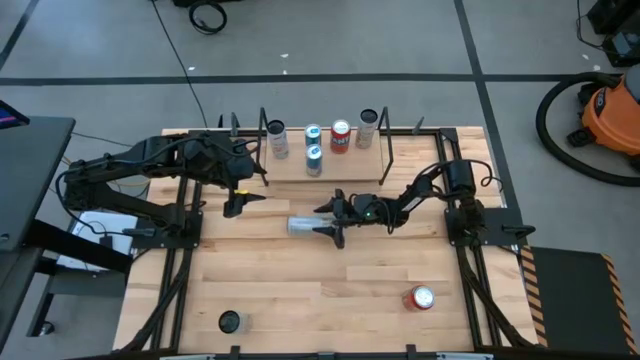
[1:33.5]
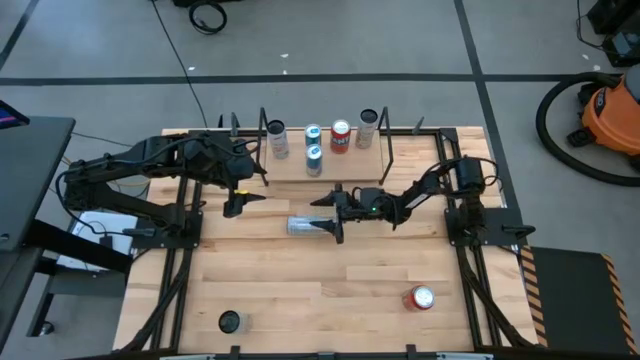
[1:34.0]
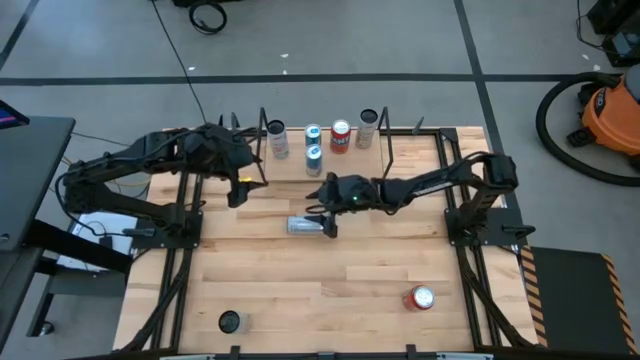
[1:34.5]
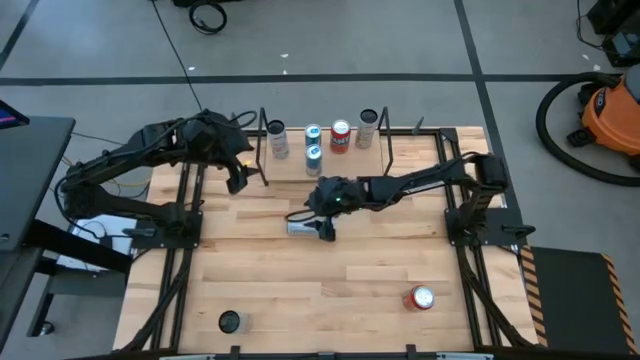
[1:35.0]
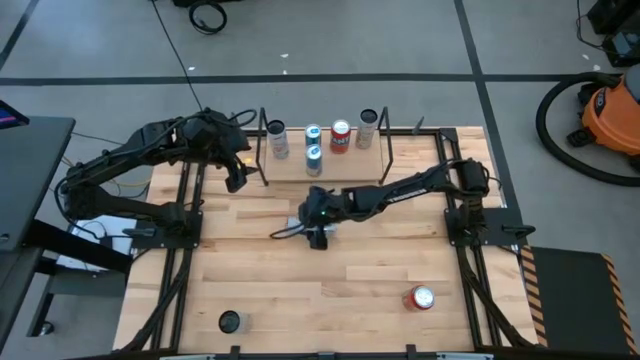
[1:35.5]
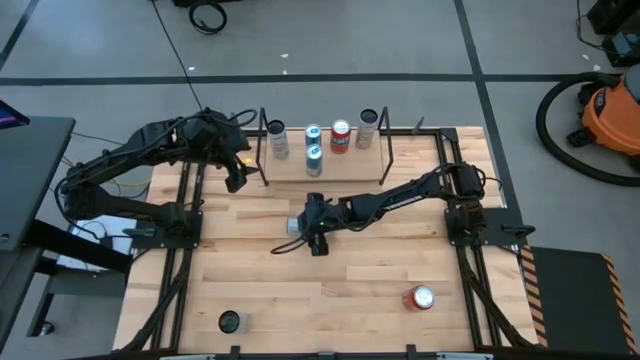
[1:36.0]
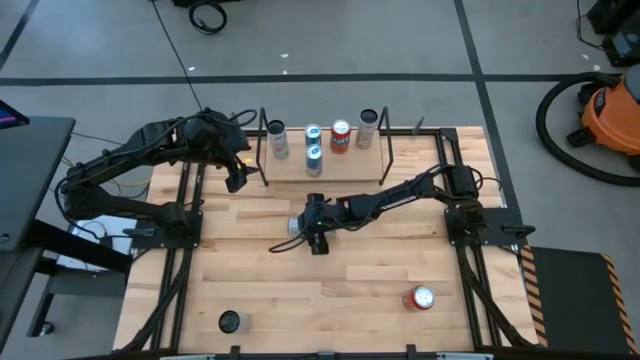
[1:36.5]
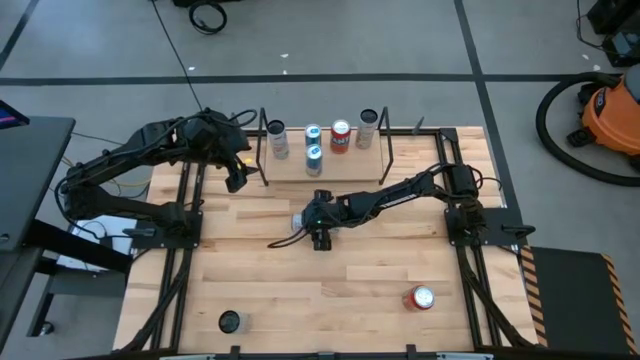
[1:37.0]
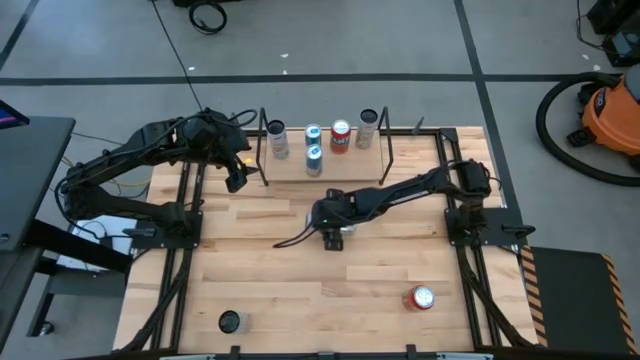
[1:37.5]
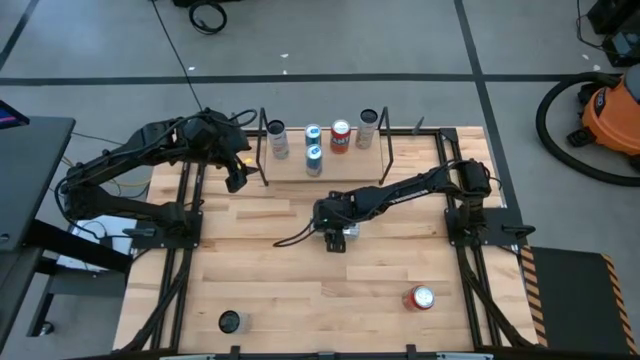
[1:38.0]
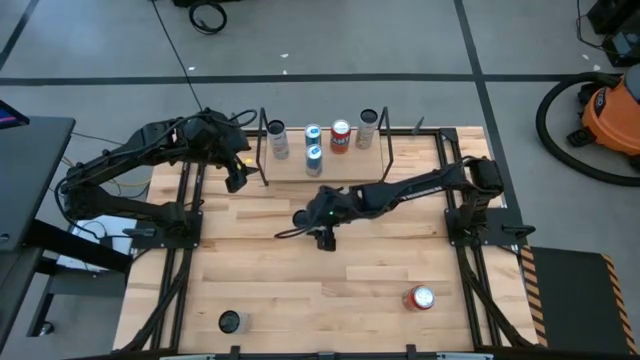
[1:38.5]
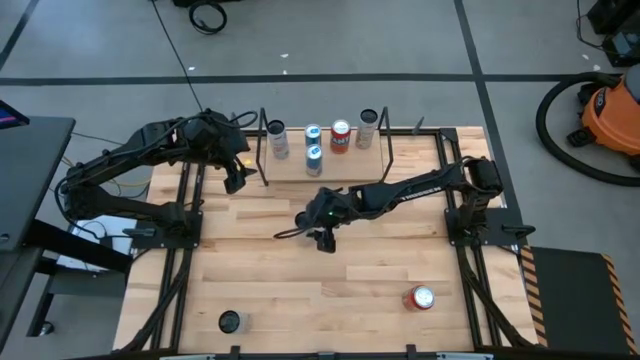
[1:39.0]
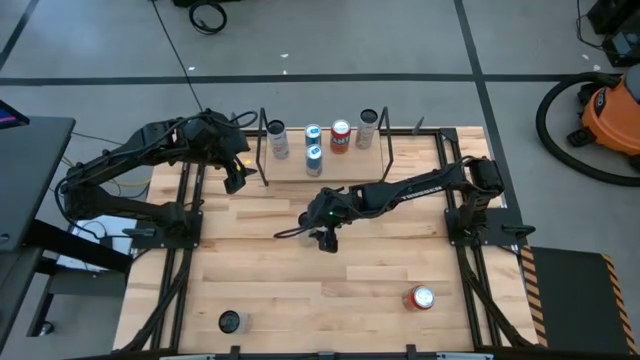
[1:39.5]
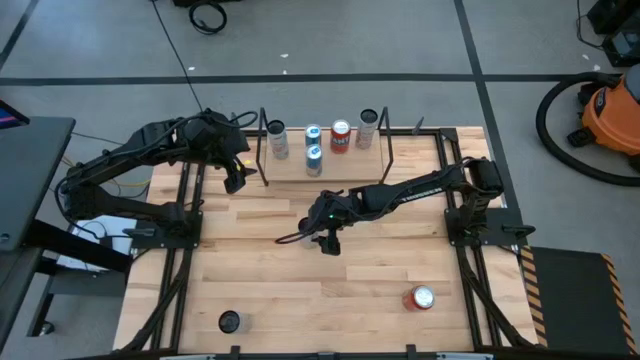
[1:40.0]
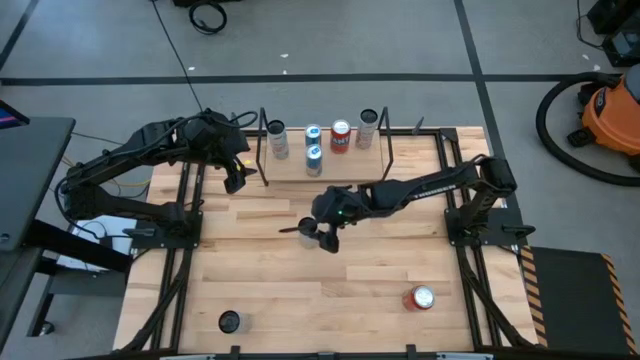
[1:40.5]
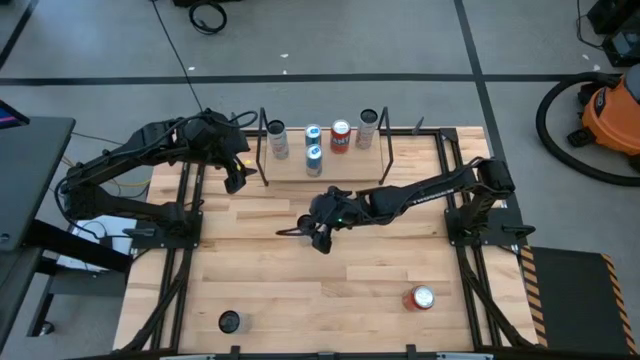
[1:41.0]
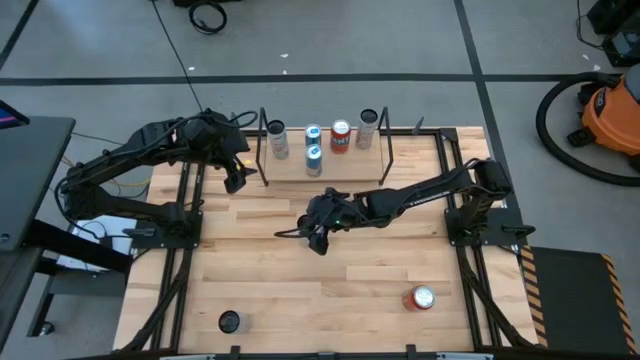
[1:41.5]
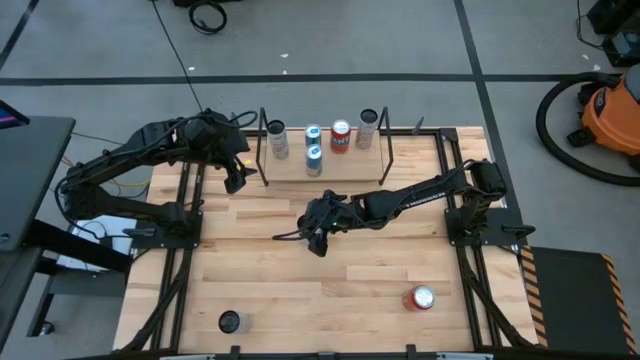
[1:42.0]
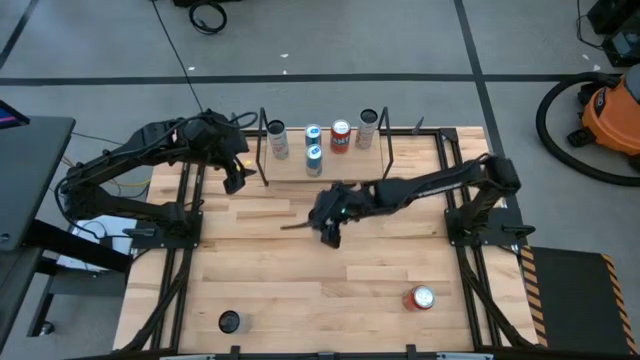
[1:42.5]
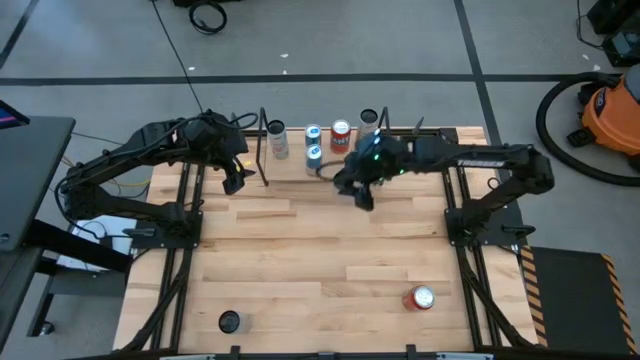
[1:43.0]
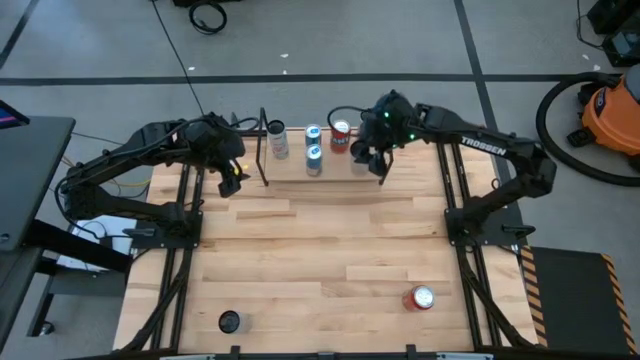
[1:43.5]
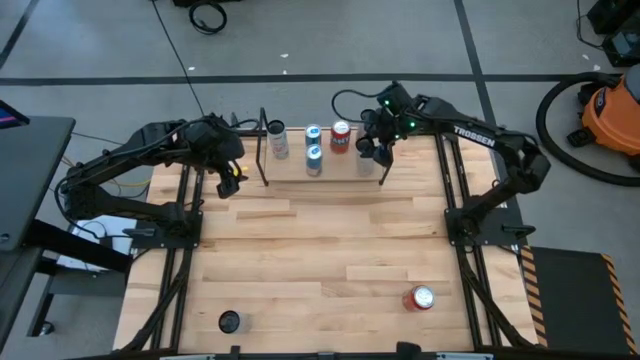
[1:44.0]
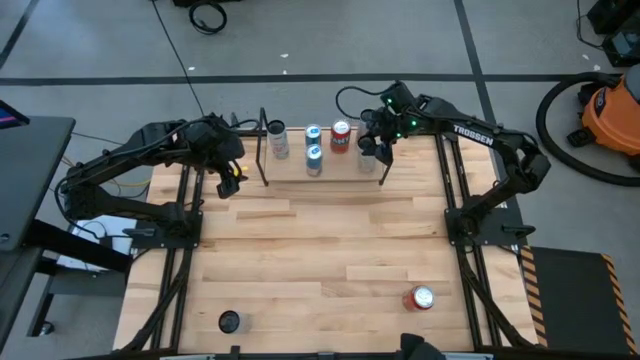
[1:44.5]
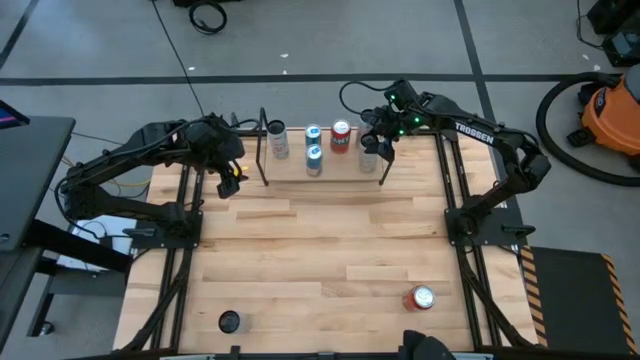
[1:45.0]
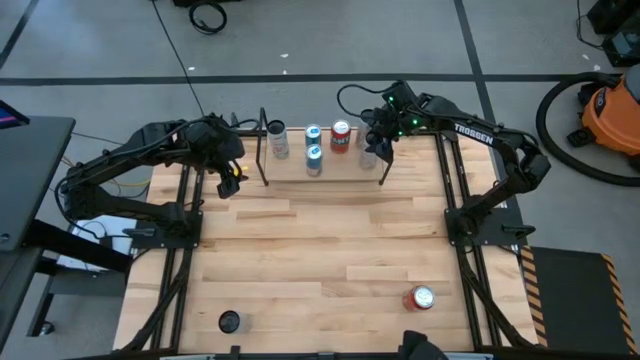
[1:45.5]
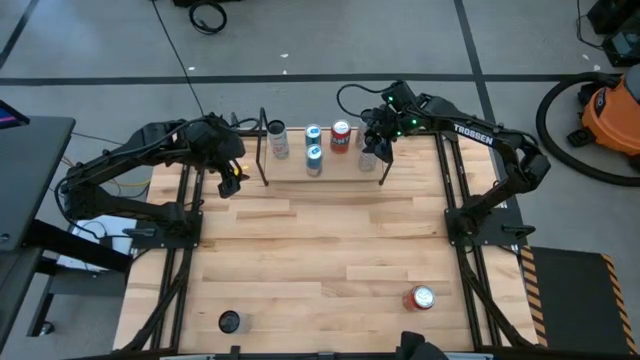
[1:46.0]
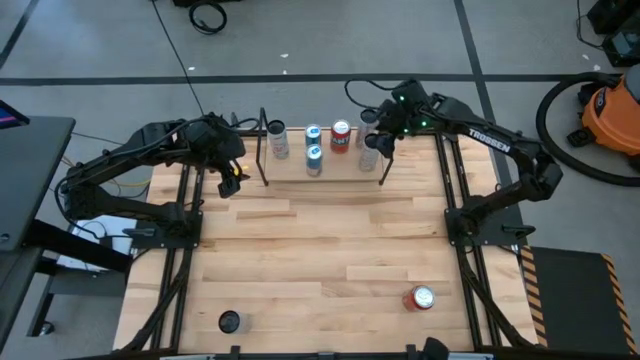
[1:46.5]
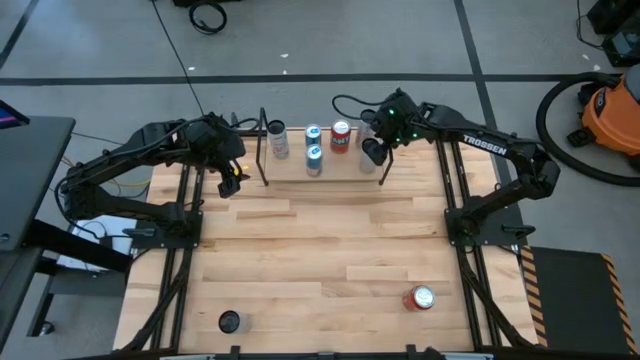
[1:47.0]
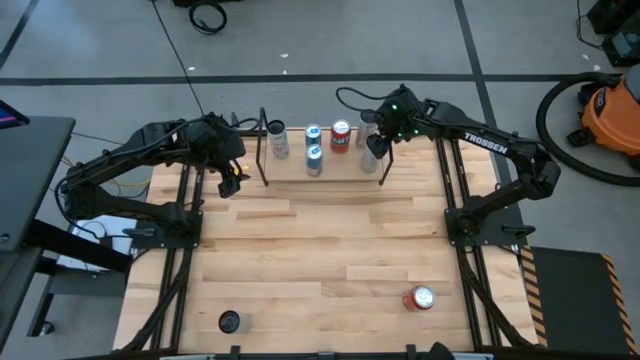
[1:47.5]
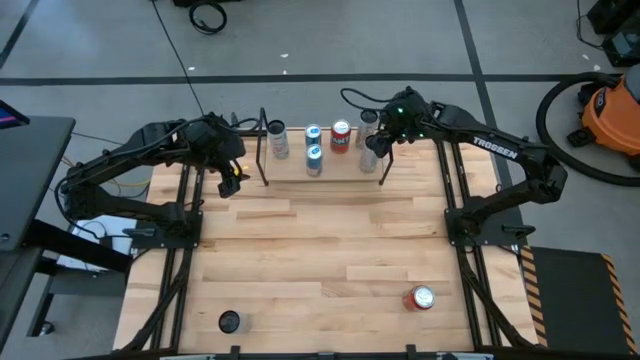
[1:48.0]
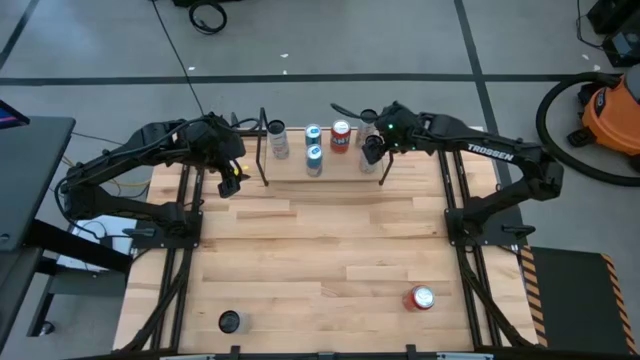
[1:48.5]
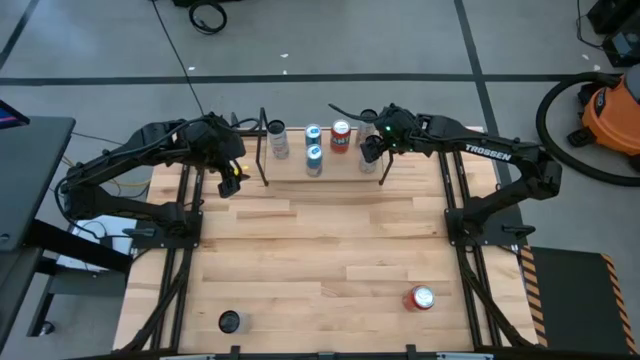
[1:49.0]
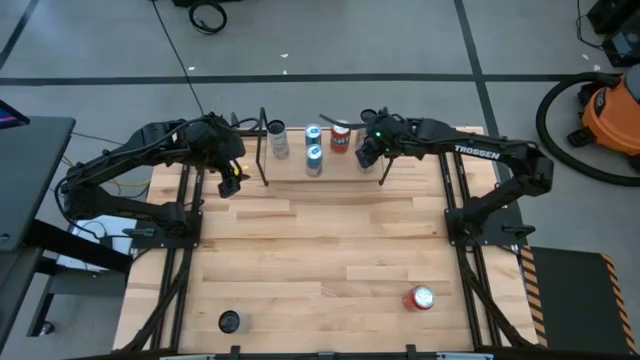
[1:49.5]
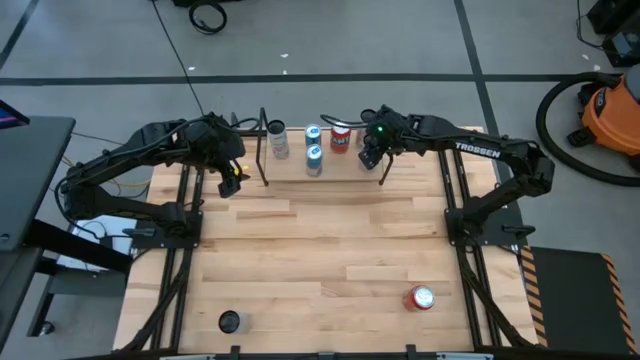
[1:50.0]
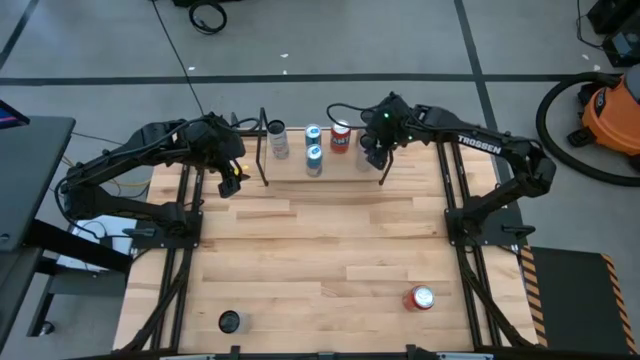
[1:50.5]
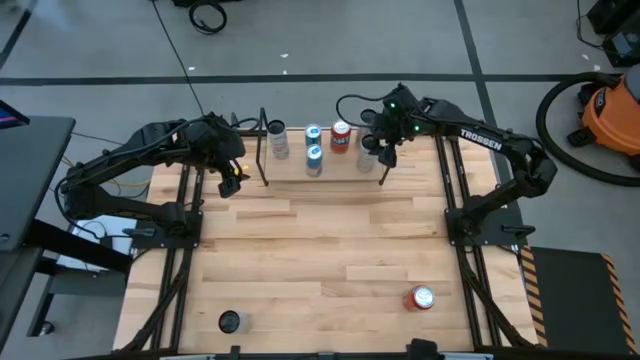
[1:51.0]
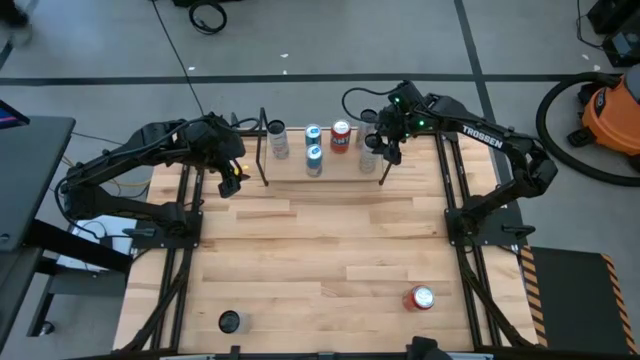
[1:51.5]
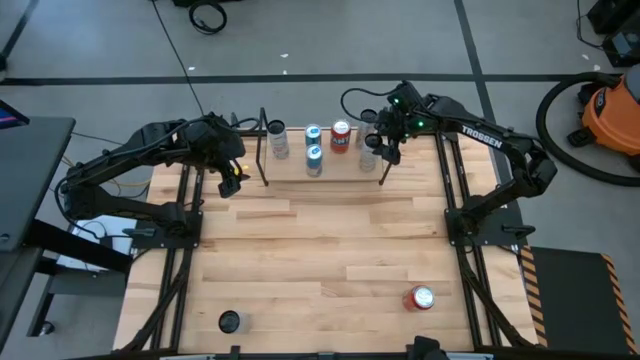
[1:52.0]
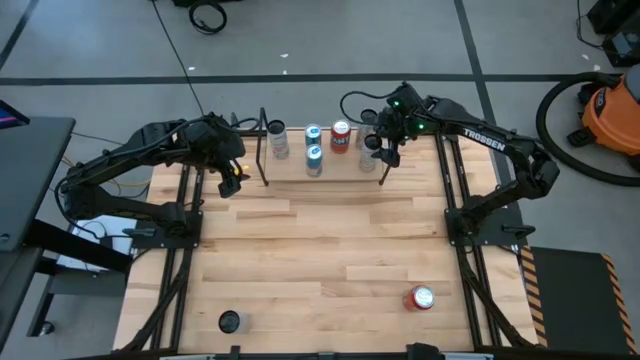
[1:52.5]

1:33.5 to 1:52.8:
Task: Place canned beverage on shelf
Put the white yellow soda can on the shelf aligned with the other white yellow soda can

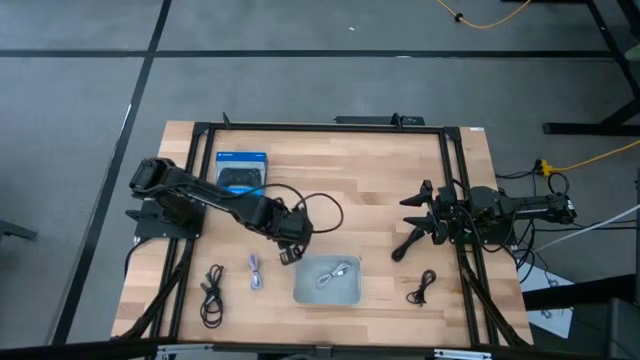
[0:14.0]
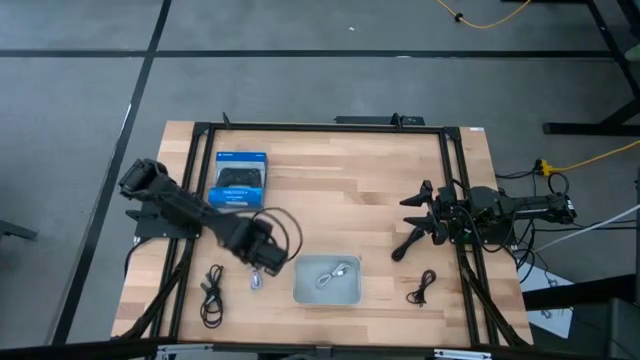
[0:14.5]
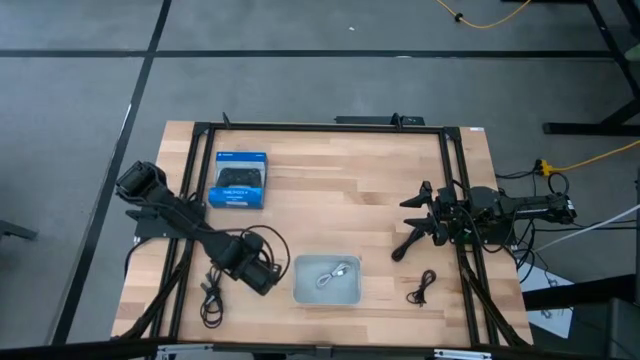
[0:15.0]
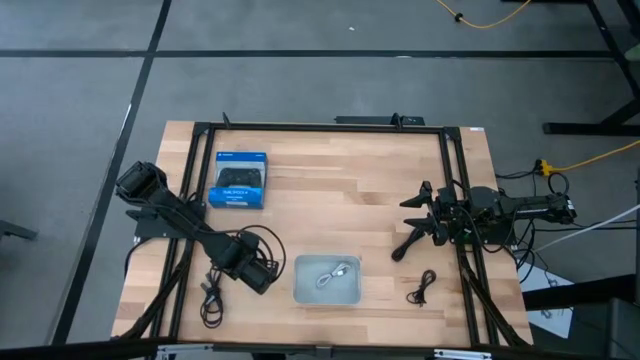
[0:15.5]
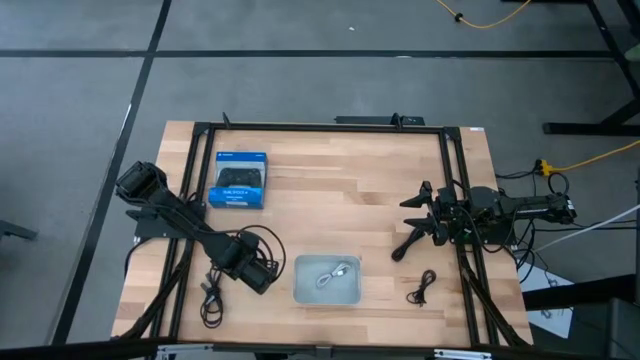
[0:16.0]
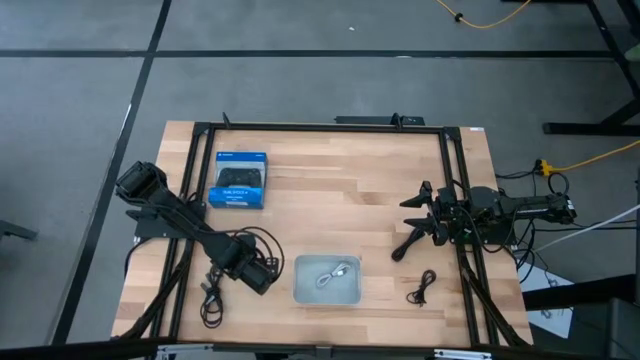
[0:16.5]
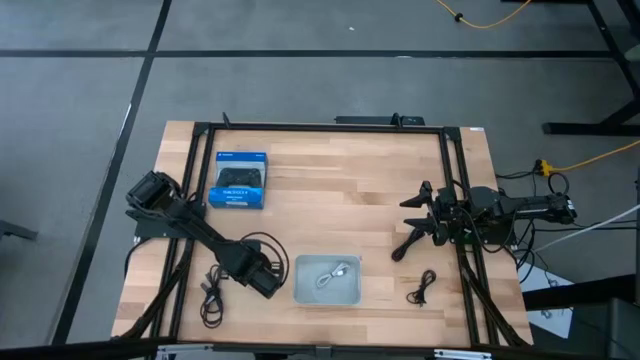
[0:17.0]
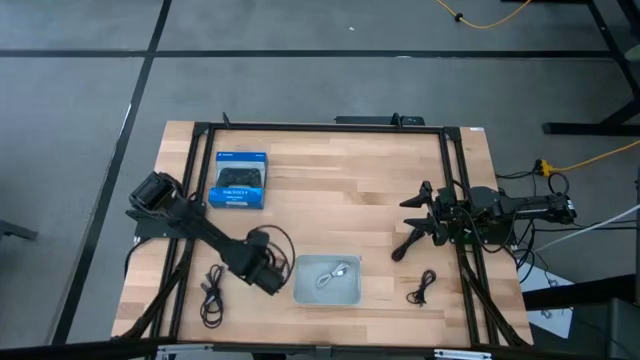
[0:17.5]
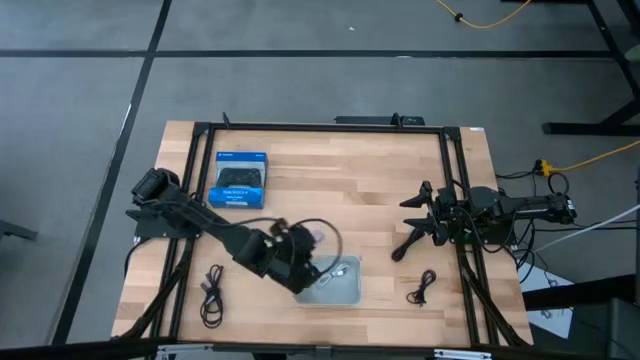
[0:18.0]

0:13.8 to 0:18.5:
Task: Pick and place USB-C Cables
Put the light purple charger cable into the gray bin
